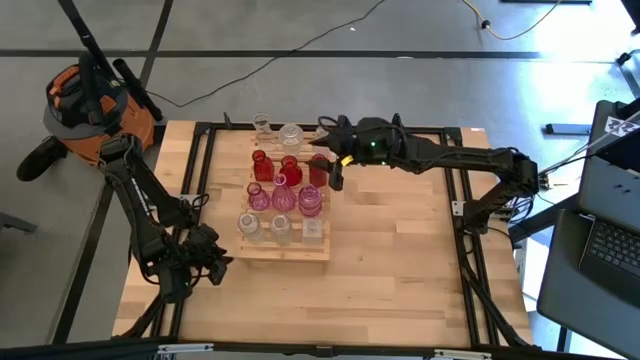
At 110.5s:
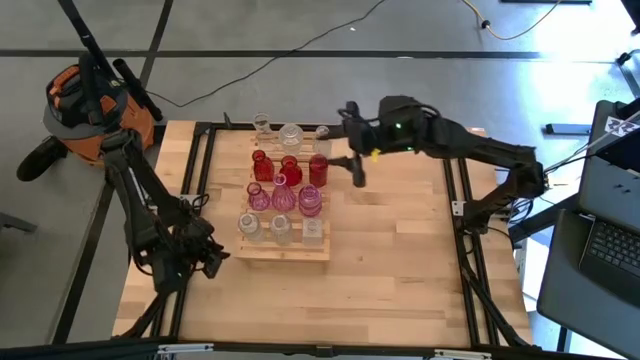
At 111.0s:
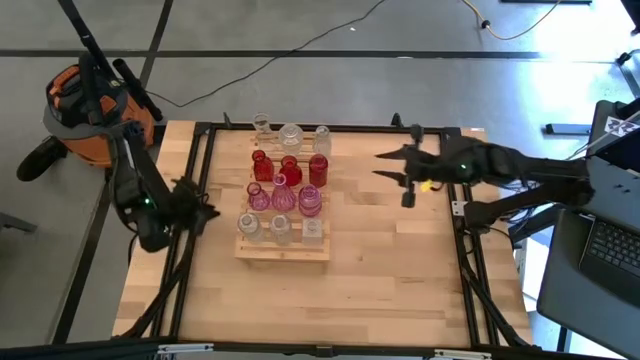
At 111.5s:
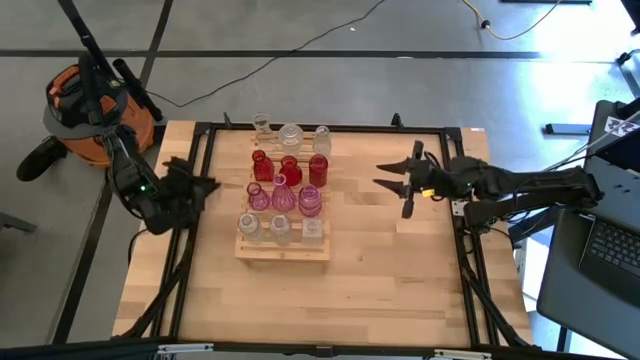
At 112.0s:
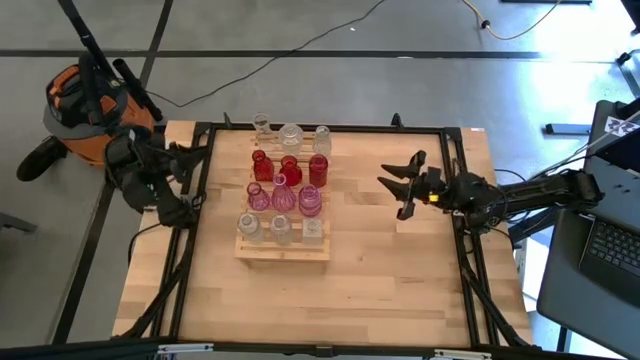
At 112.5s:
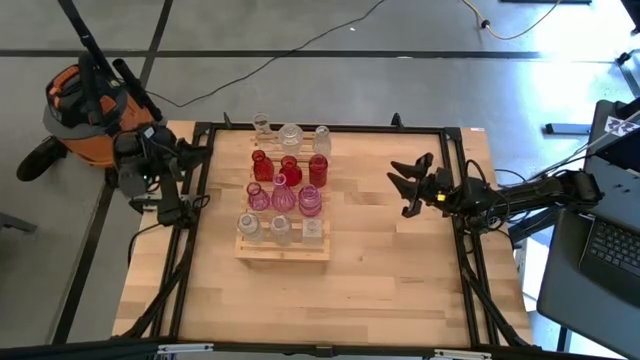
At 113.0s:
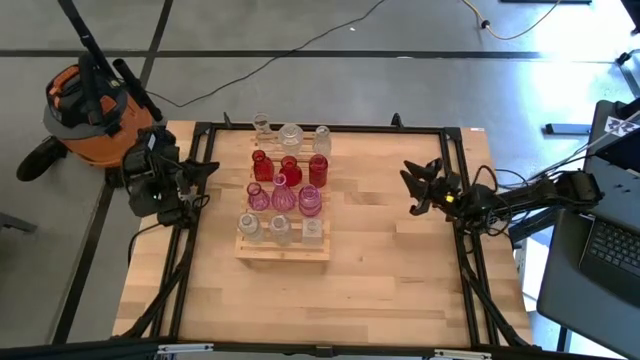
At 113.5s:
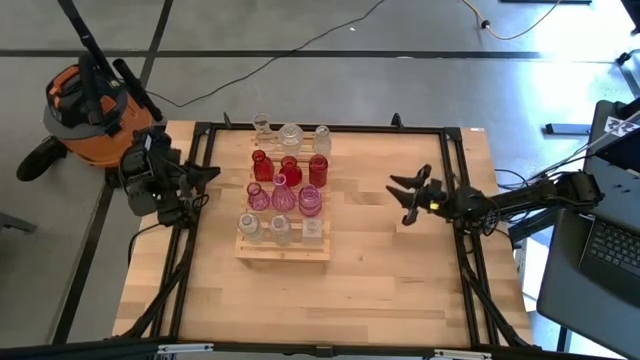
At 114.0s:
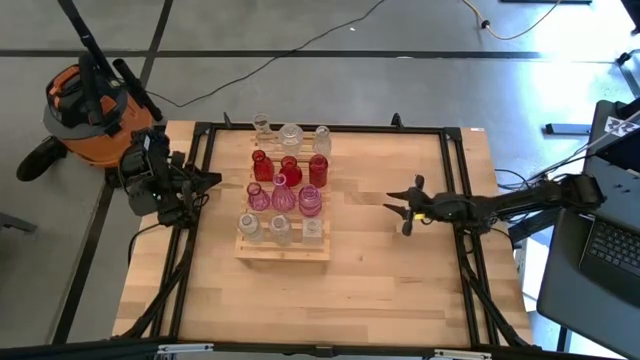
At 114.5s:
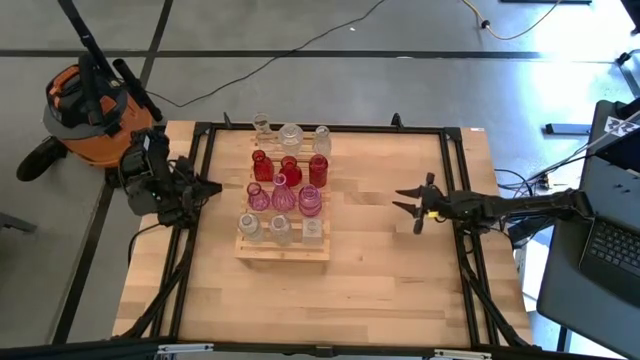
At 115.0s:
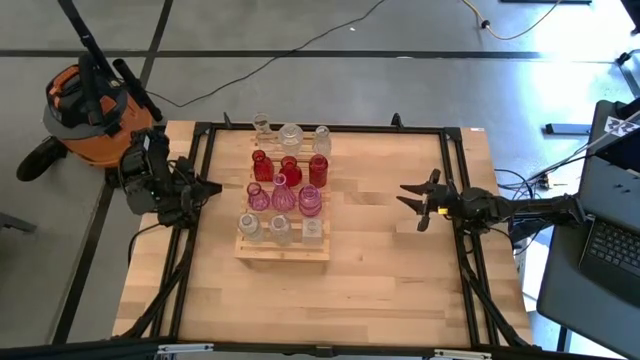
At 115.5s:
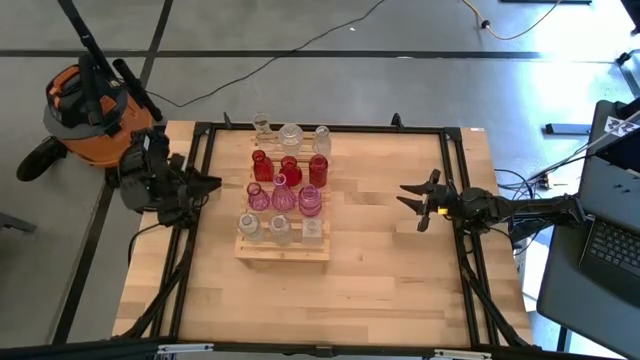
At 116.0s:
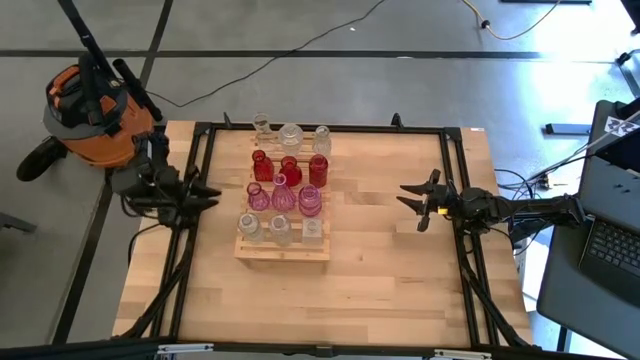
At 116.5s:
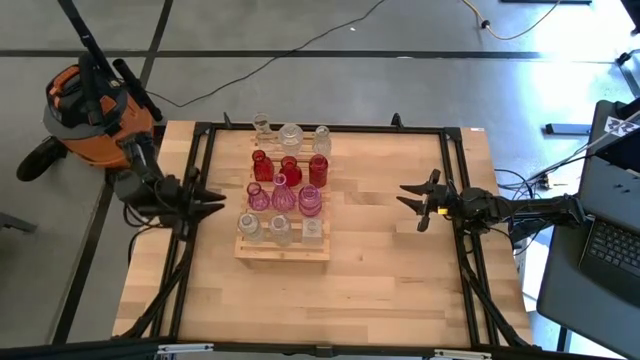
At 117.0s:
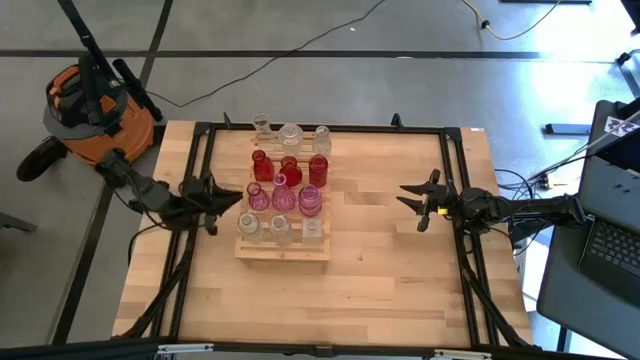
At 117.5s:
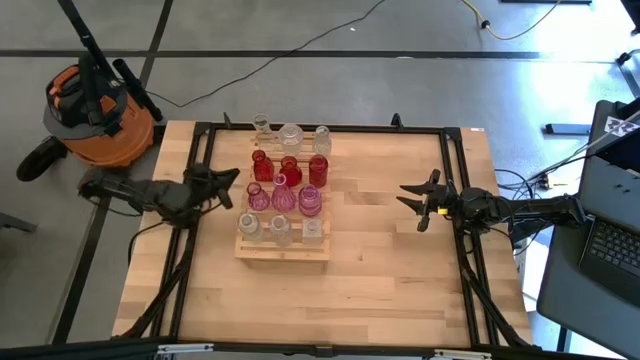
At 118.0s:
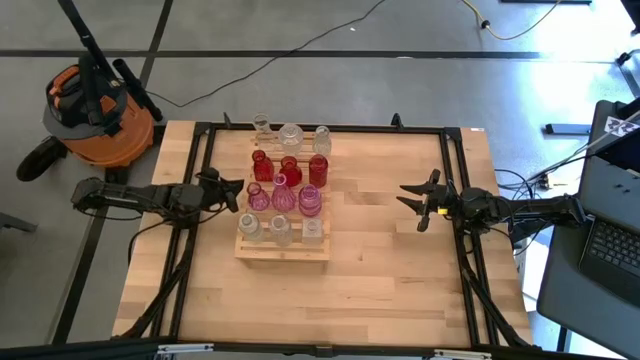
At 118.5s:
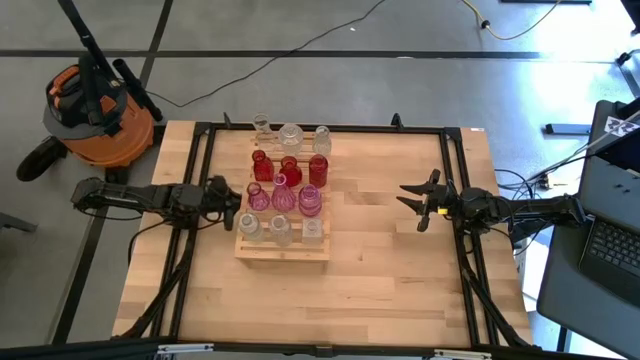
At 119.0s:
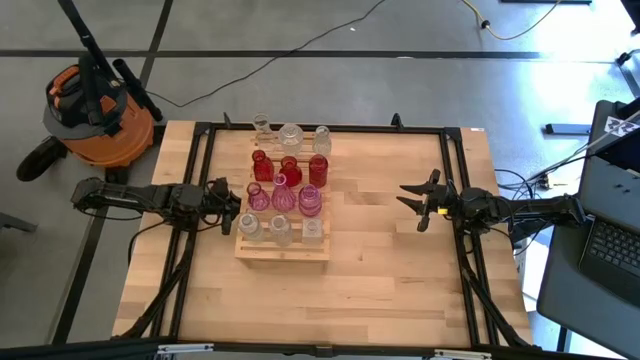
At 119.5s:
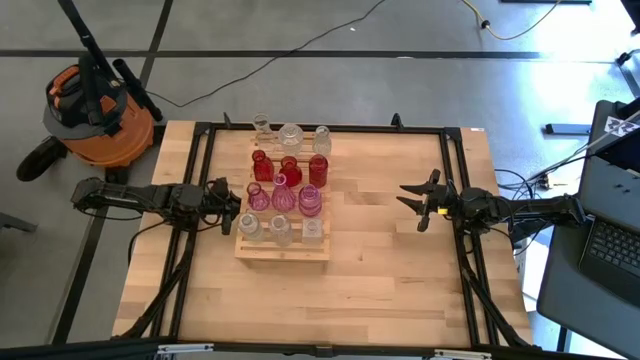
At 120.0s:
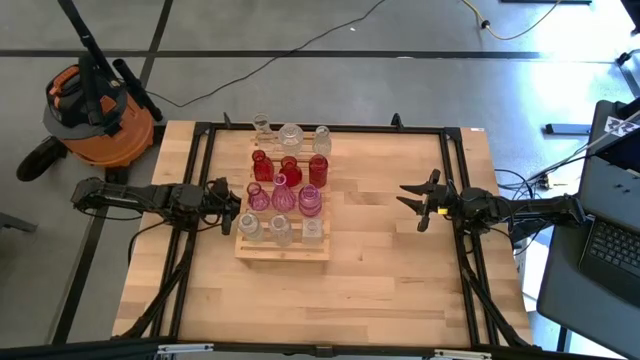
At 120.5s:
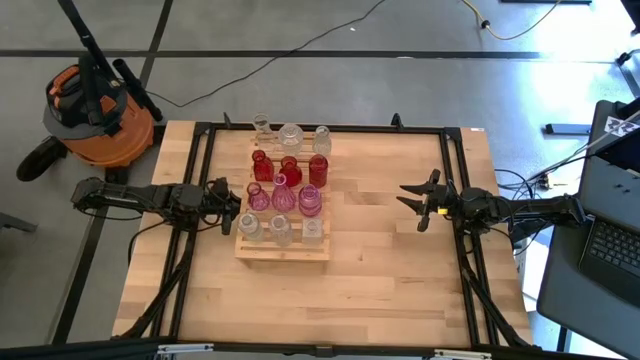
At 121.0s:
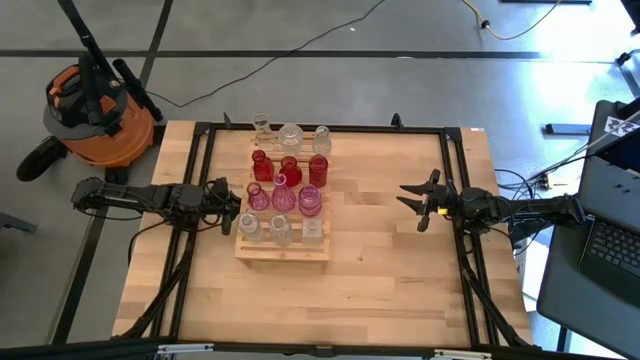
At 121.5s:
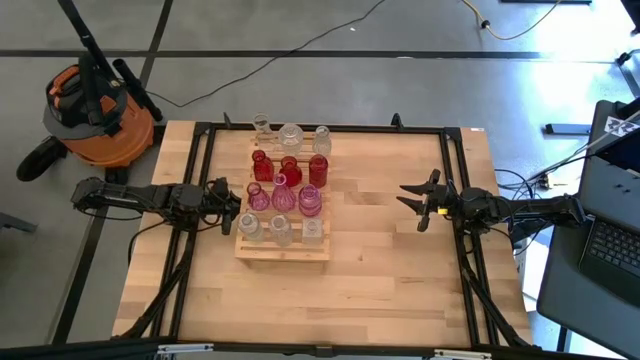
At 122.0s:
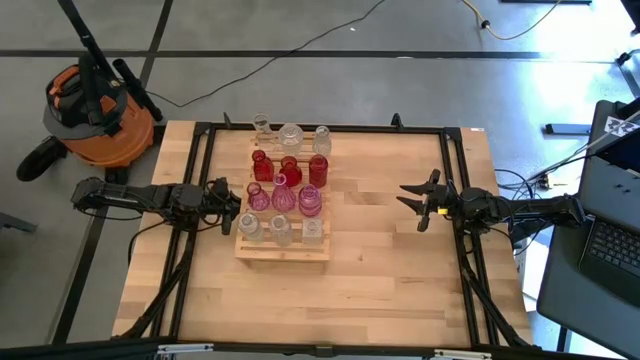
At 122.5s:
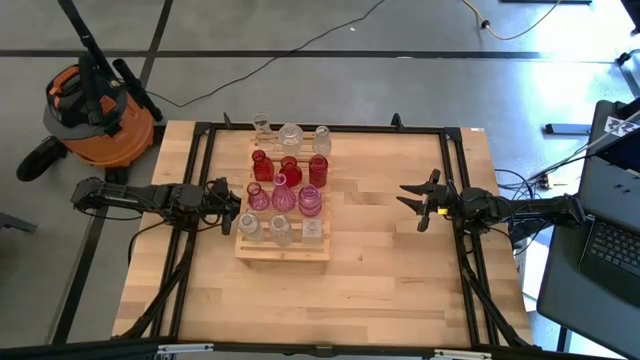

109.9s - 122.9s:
Task: sort vases onto shelf
Return to Home Position
